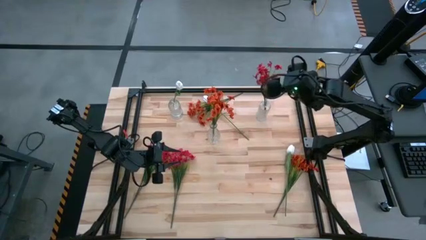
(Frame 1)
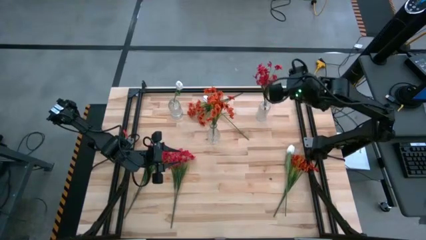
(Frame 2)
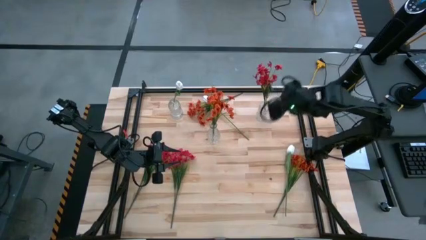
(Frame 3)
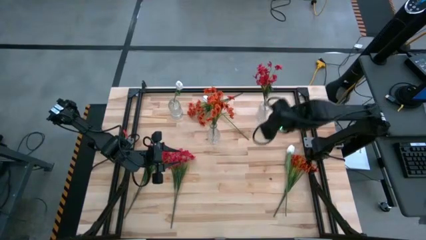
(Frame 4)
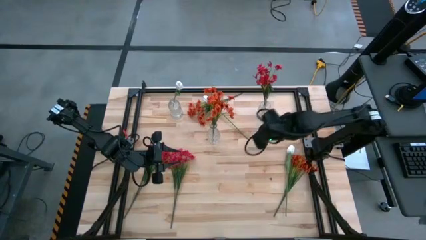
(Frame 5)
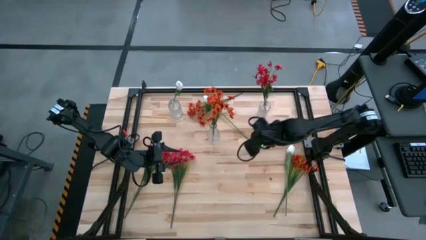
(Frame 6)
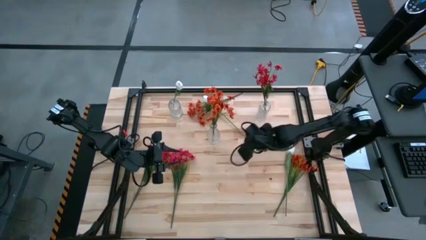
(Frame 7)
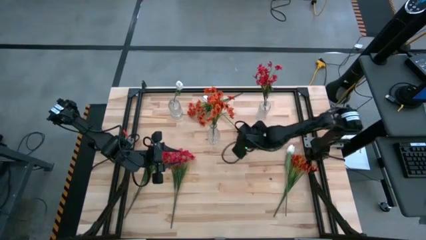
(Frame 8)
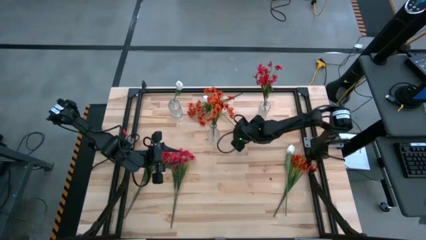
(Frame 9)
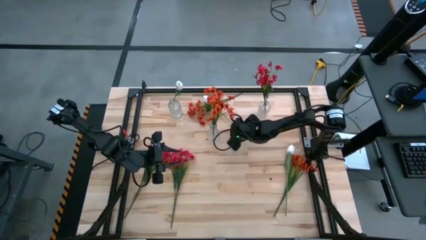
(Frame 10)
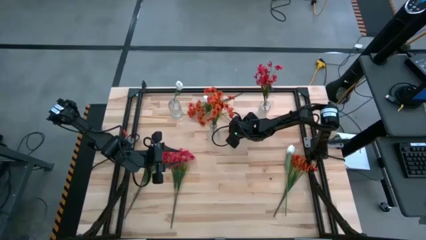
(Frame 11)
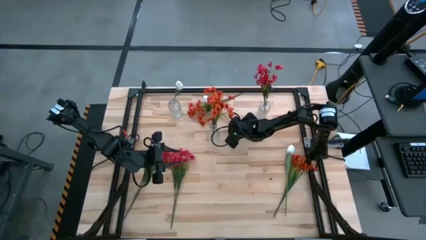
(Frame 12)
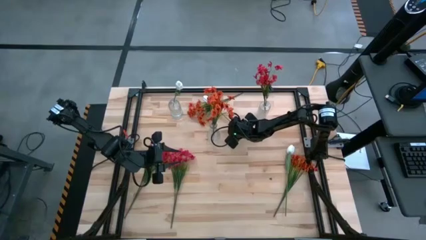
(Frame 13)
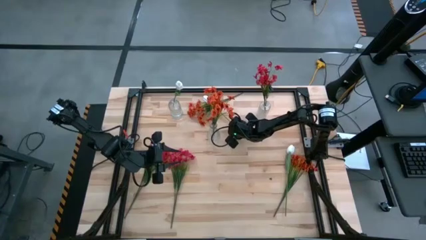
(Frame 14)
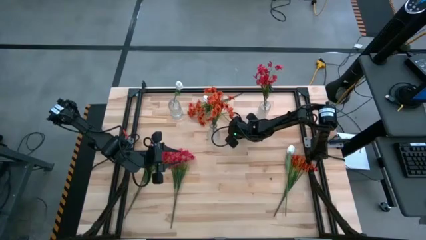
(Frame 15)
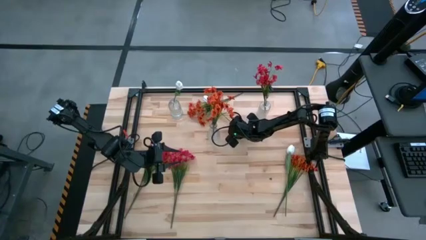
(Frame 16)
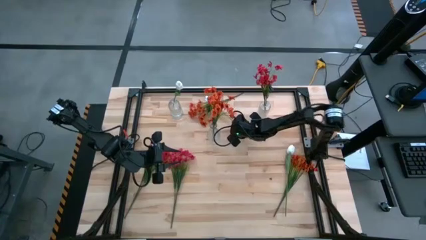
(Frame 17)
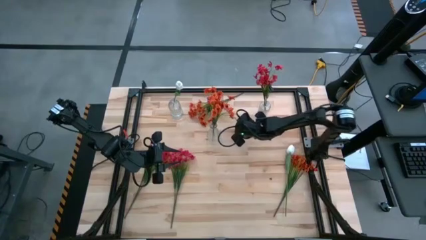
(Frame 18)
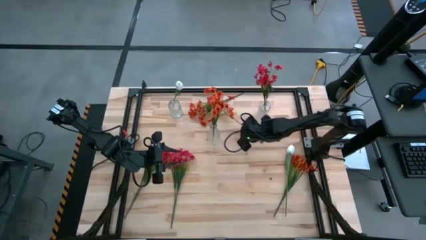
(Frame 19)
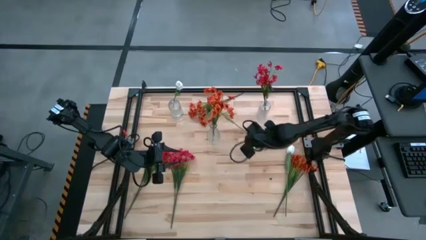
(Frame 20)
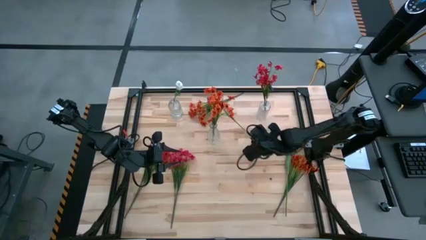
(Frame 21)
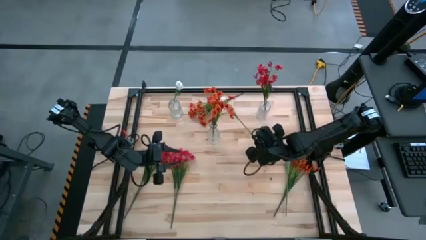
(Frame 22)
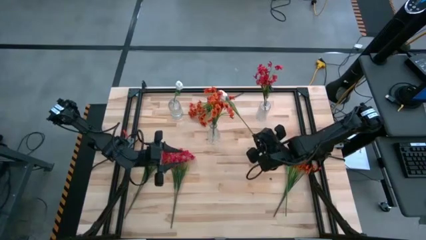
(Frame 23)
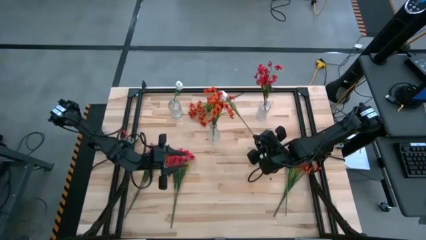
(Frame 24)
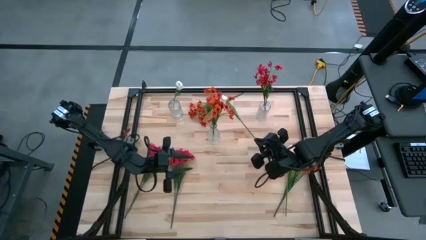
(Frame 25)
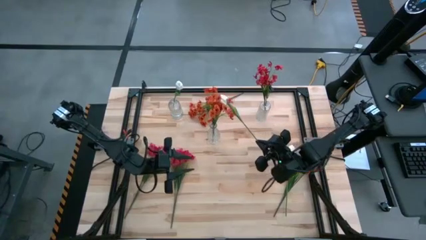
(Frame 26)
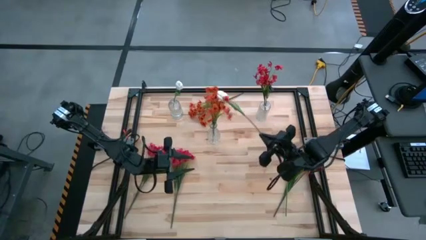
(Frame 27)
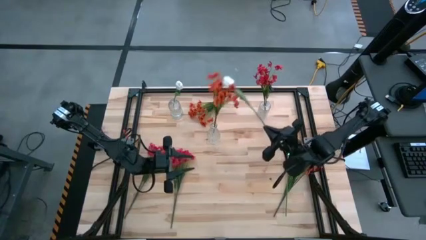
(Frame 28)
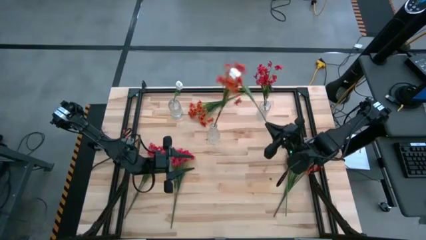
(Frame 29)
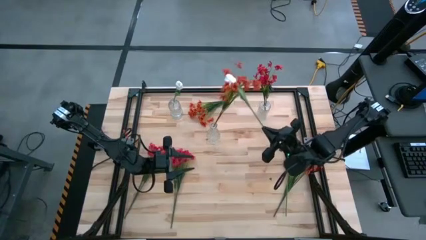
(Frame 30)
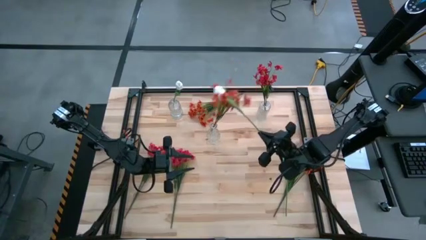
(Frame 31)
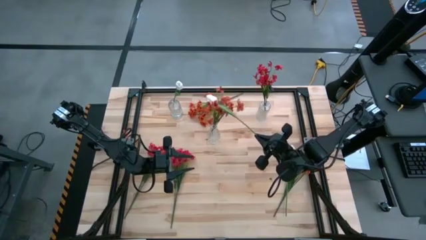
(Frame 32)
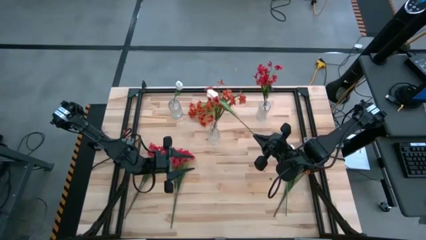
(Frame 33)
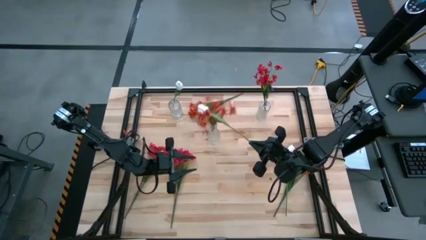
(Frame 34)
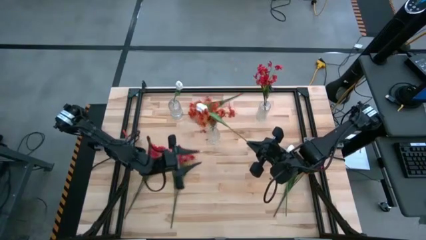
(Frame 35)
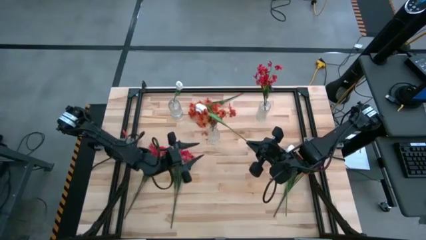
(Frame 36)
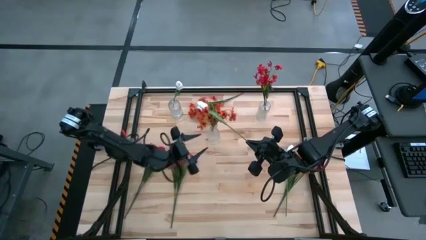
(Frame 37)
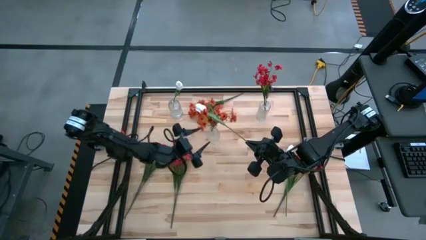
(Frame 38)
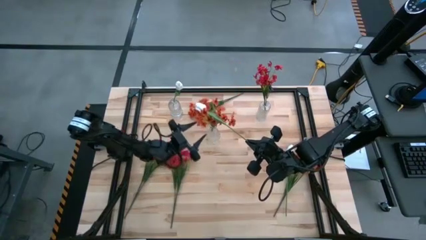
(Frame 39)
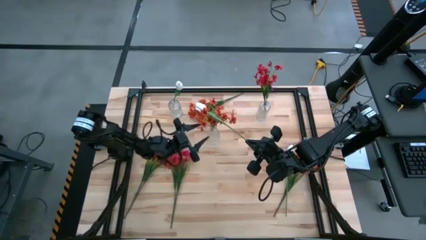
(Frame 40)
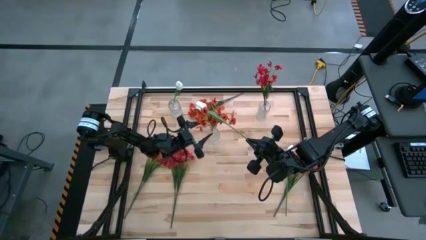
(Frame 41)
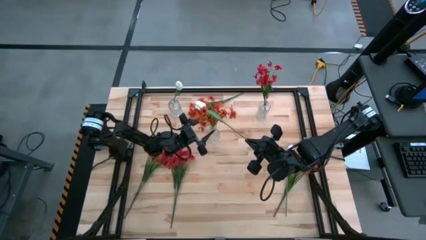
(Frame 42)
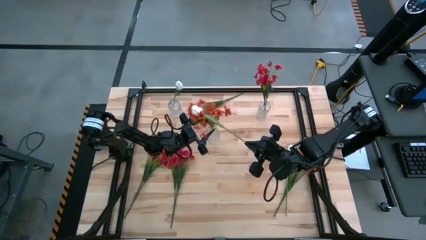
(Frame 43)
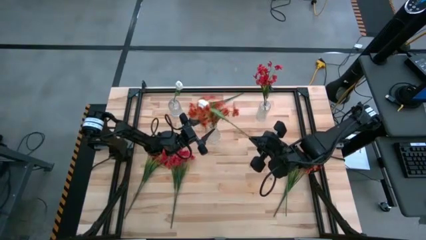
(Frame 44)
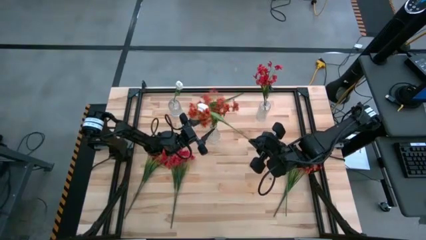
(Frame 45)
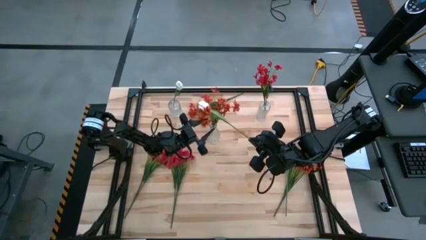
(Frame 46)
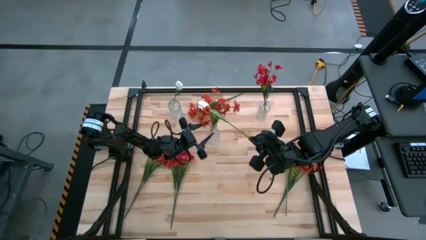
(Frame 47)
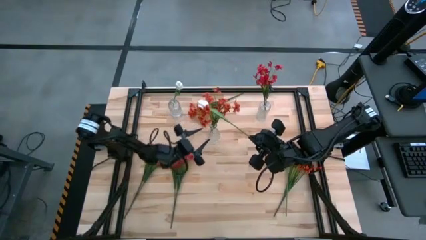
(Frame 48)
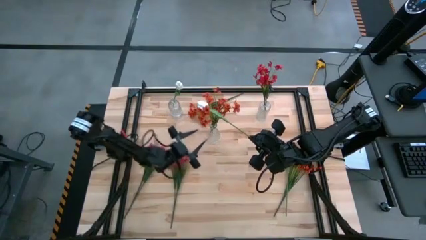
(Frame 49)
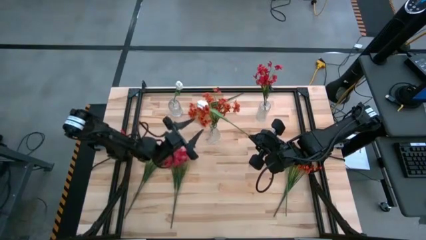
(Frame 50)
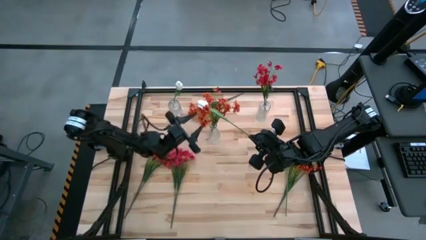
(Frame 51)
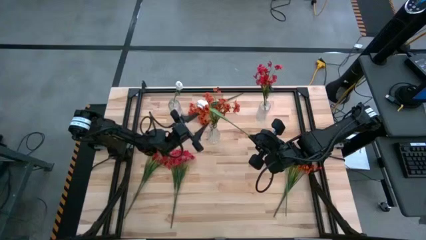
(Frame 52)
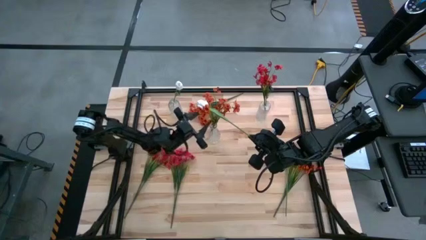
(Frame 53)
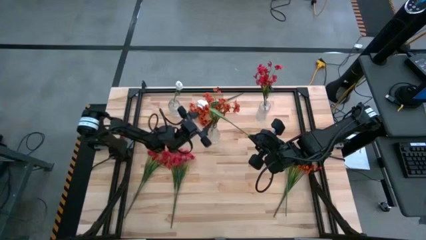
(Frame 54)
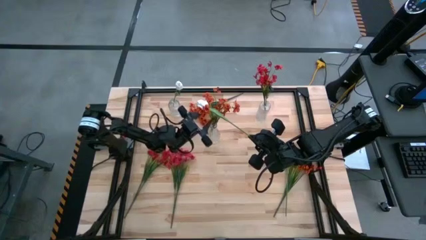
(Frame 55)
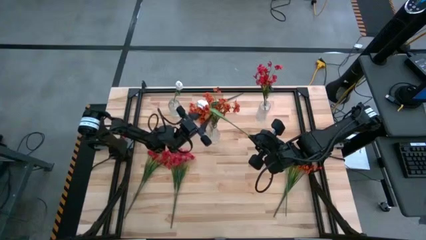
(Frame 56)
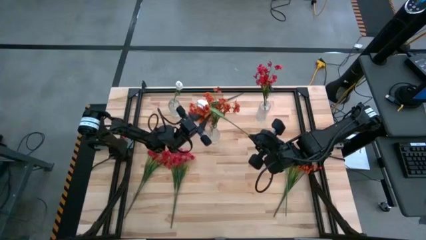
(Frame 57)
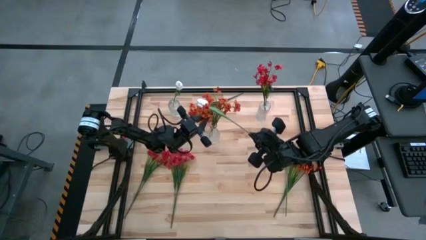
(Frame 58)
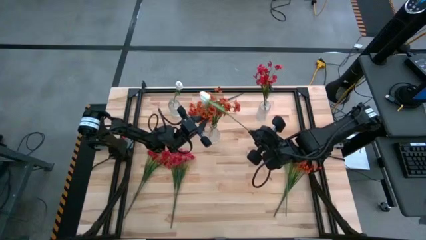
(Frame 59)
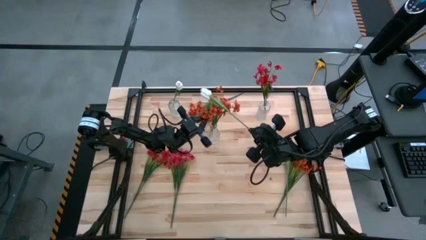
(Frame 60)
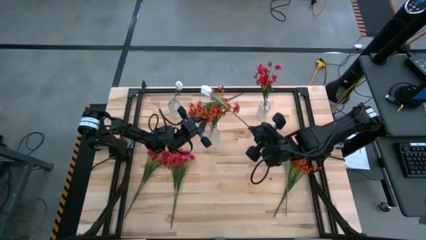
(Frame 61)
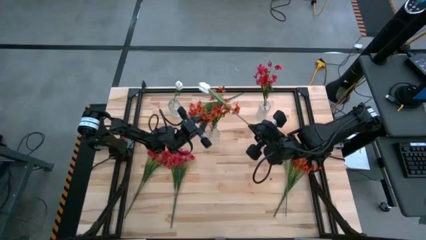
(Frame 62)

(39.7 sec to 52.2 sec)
Task: Sort flowers into vase by color
Put the top white tulip into the top left transparent vase

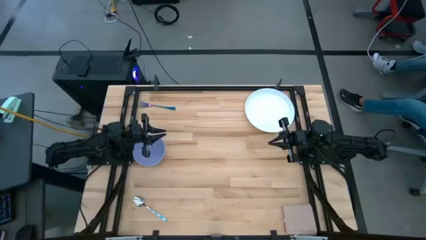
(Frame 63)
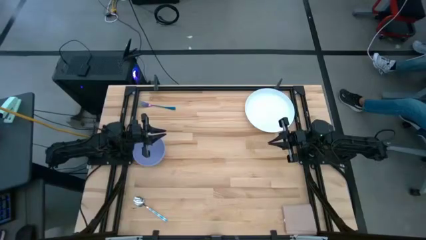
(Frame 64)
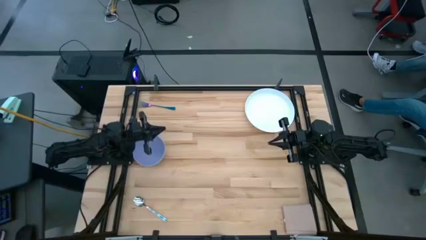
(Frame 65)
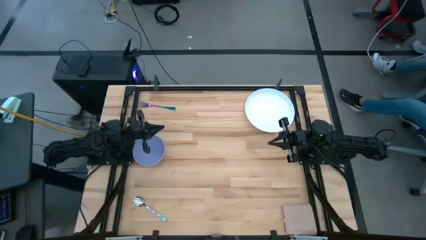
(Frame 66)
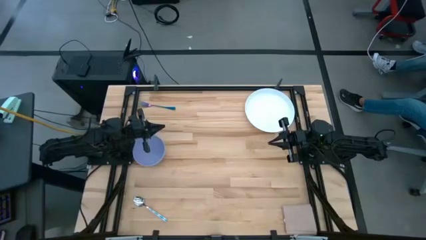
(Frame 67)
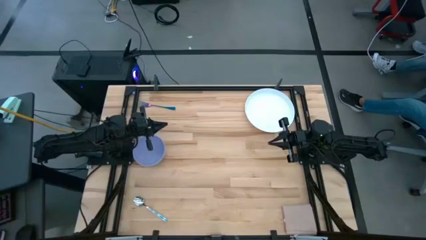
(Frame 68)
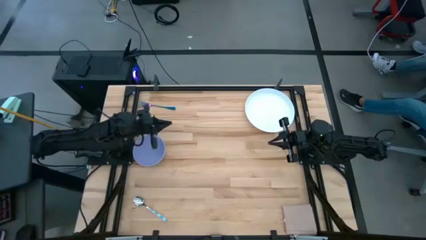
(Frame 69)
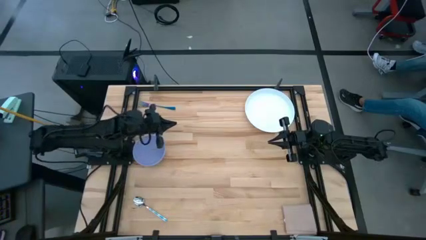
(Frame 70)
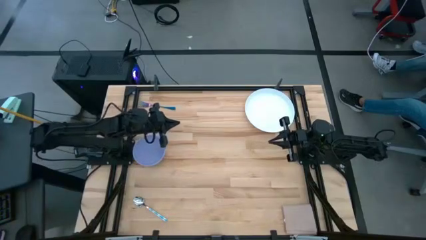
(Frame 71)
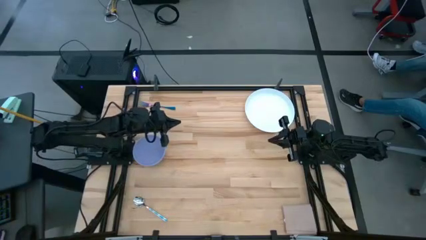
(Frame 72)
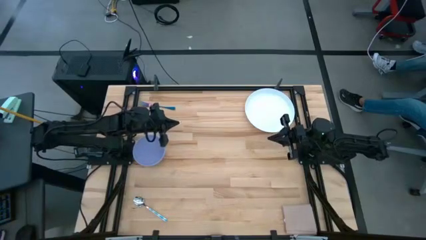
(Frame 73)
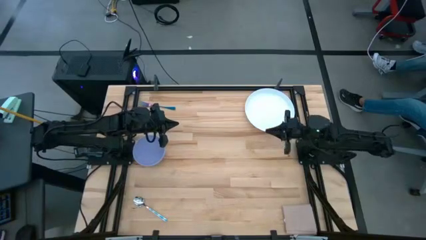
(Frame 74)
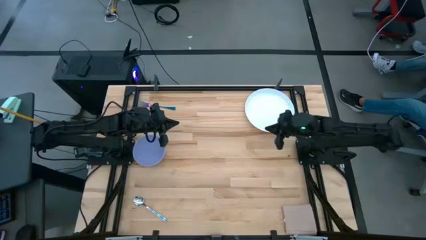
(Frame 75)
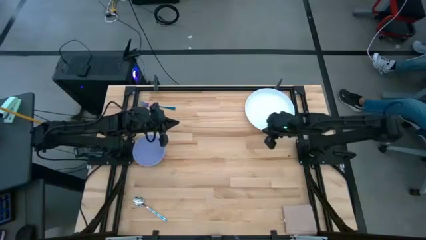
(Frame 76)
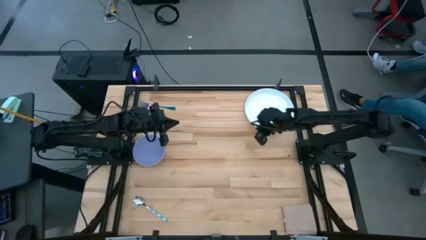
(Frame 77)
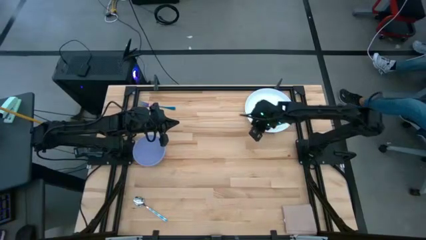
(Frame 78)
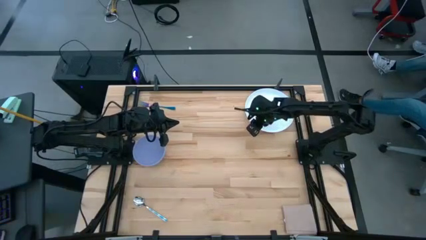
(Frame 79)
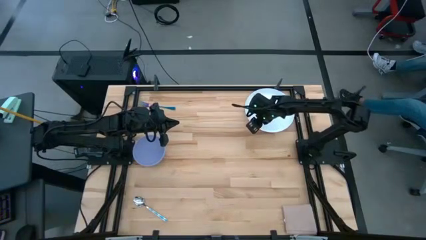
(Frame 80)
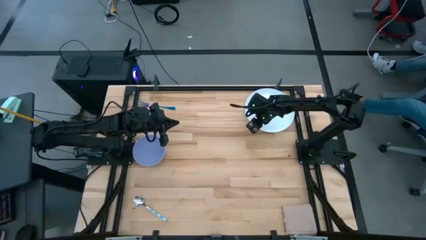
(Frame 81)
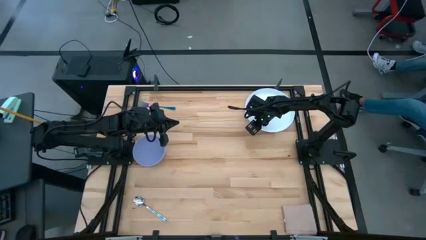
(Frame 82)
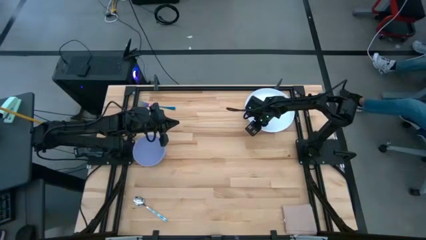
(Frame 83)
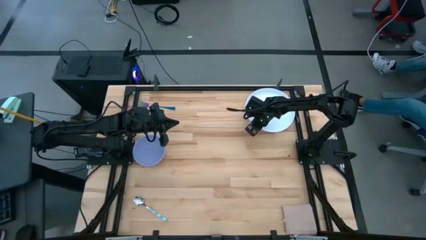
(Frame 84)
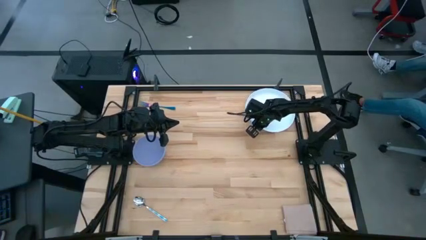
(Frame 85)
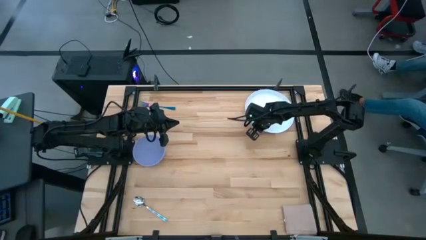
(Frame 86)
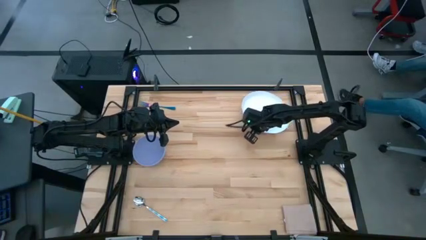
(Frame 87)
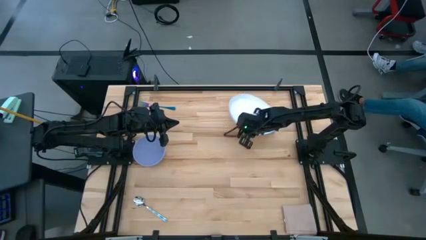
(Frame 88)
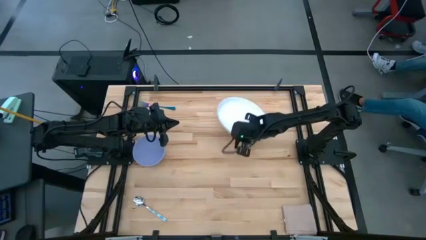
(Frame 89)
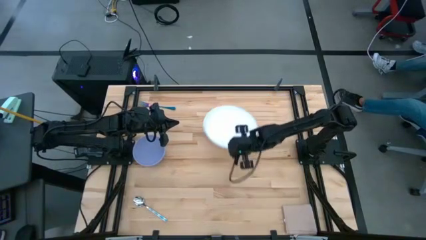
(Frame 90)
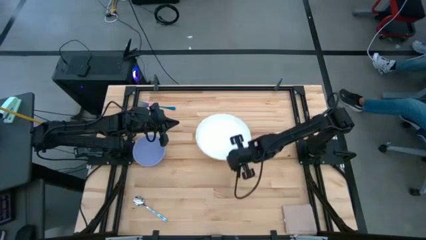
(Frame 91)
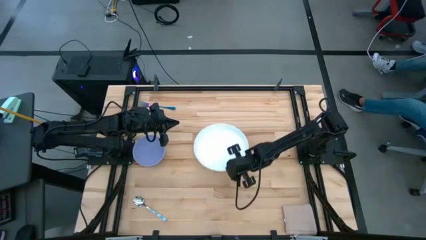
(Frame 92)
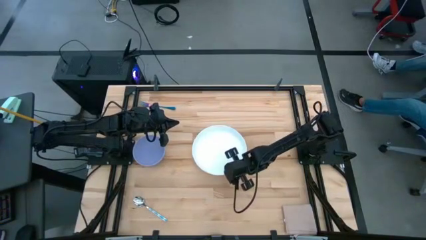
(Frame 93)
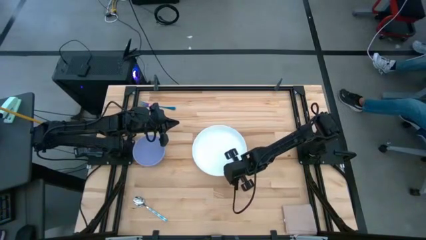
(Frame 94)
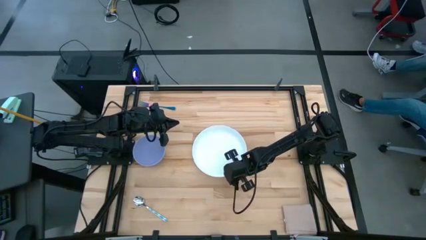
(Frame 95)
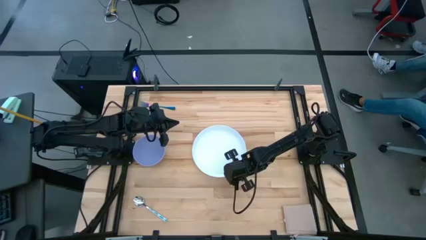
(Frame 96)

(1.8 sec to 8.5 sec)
Task: Set table place
Move the plate to the center of the table
